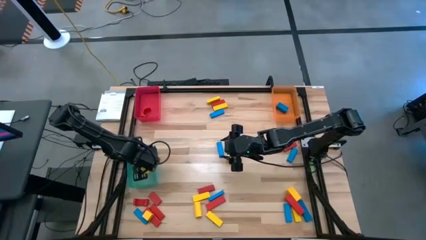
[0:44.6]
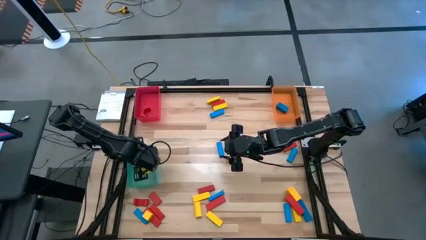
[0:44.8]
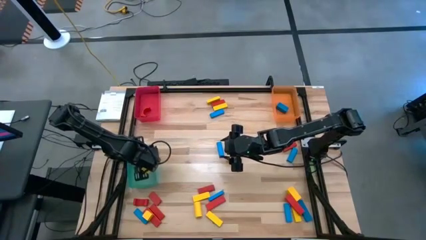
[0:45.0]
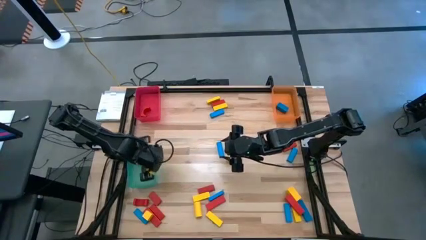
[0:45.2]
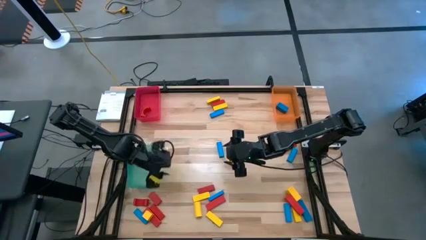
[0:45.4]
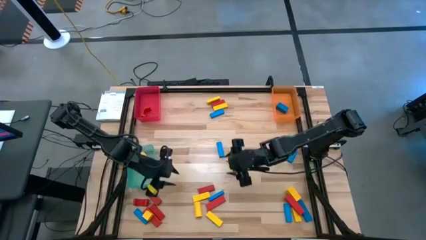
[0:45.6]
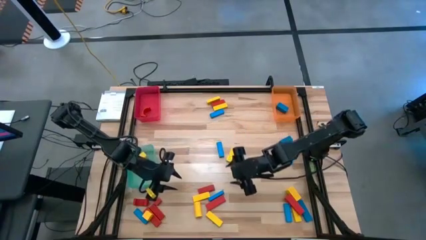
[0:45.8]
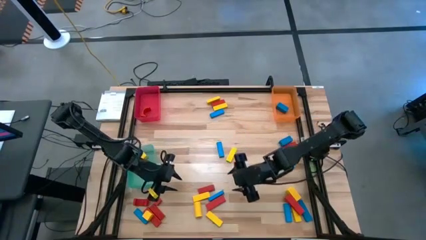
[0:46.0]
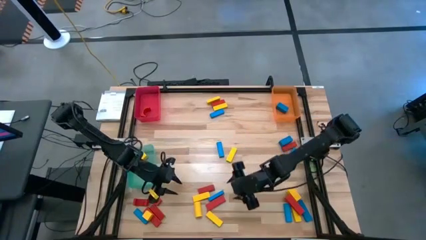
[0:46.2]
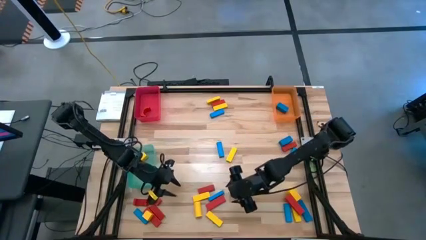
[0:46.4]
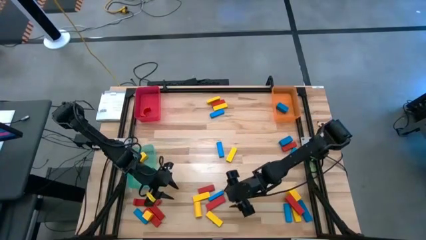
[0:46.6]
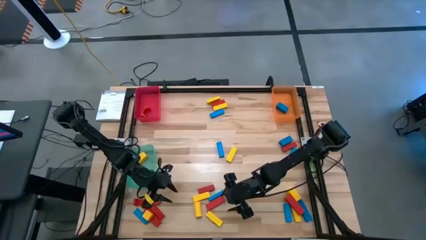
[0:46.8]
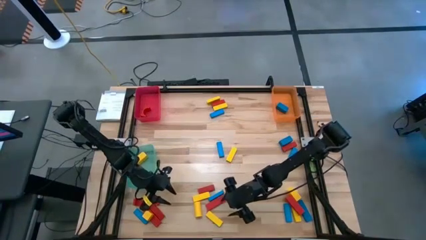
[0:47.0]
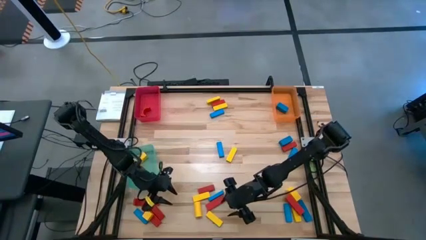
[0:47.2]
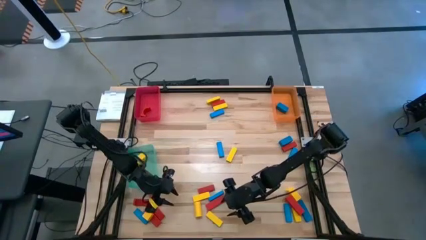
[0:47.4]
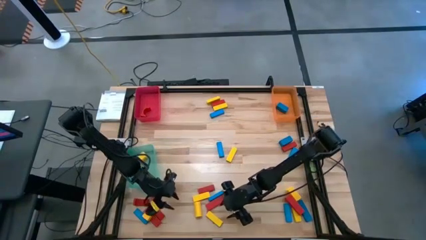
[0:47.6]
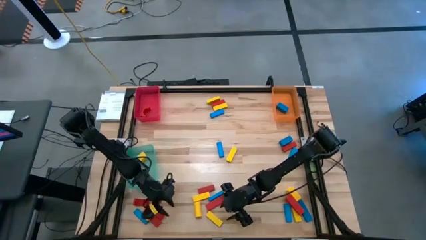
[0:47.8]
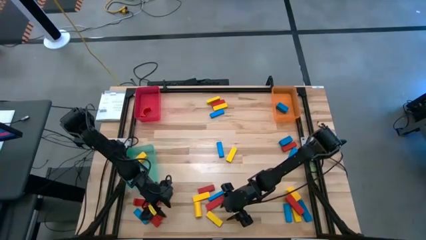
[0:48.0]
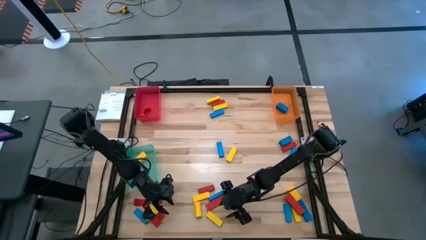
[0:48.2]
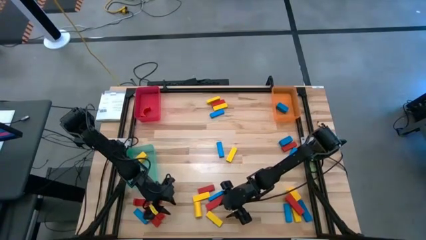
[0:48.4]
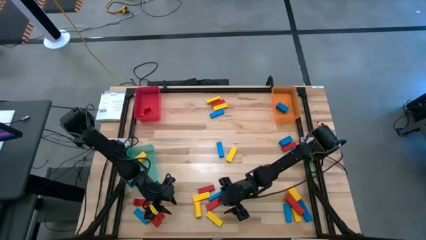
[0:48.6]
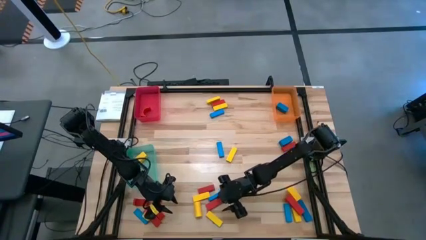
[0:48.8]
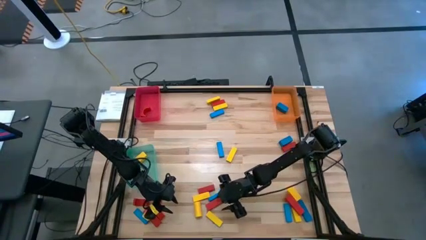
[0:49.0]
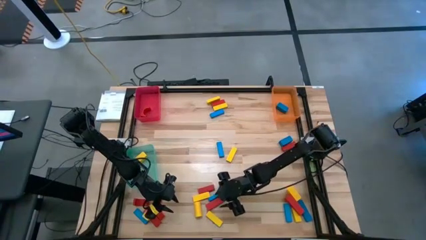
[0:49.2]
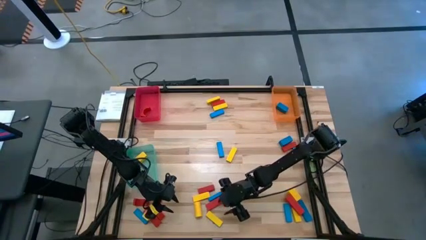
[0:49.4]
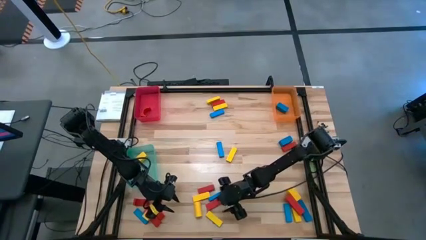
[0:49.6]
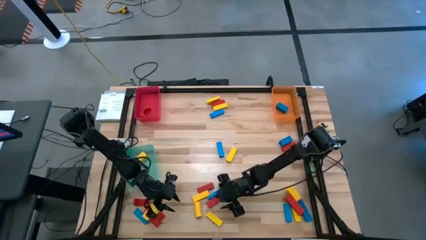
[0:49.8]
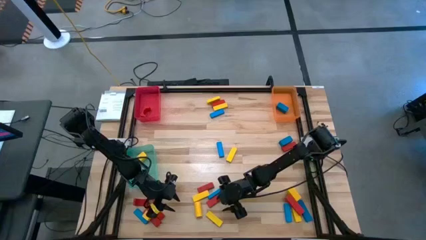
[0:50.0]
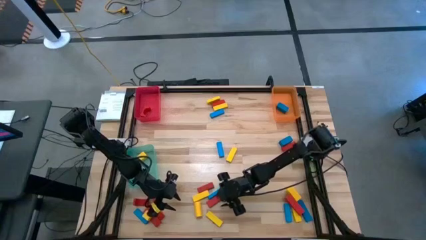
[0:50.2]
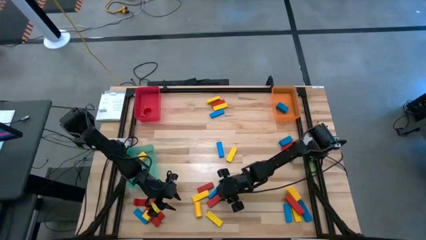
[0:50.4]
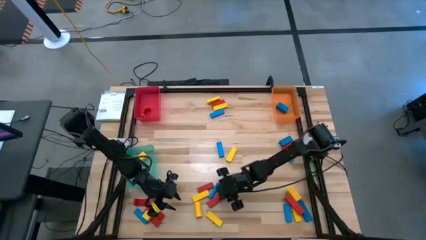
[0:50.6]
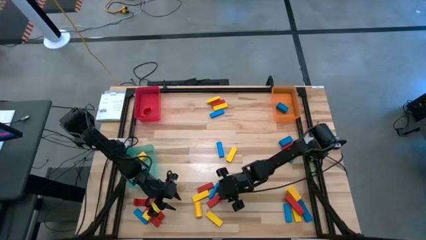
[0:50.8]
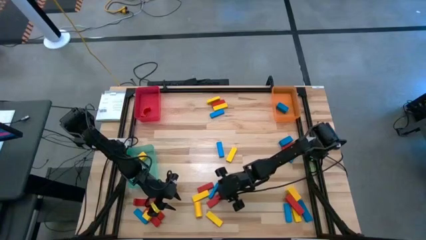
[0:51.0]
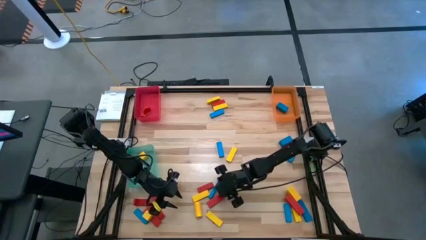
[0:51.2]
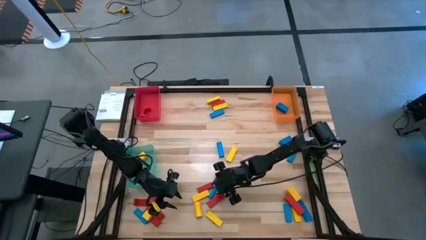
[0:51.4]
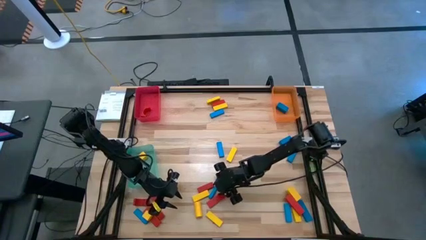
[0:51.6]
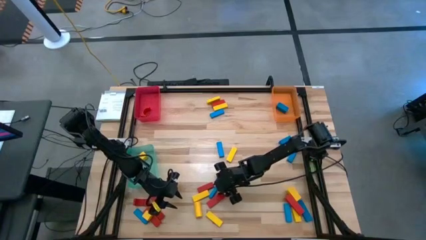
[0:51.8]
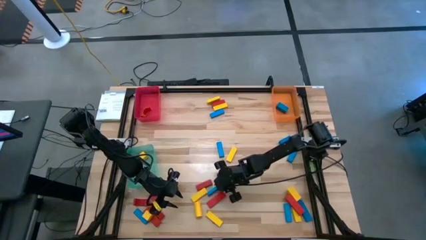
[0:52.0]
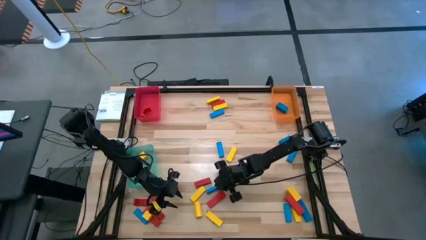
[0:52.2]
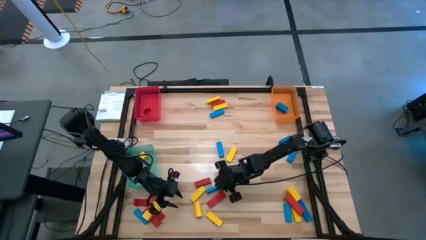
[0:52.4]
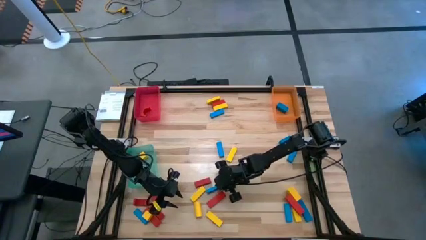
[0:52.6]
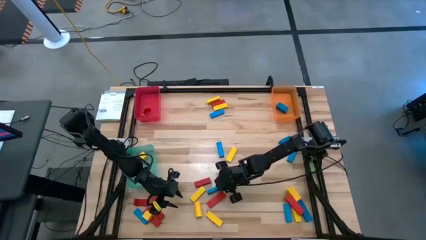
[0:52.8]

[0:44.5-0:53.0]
Task: Sort blocks
Put the blue block into the orange bin

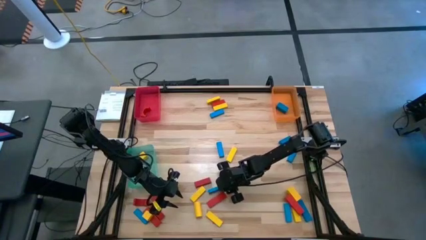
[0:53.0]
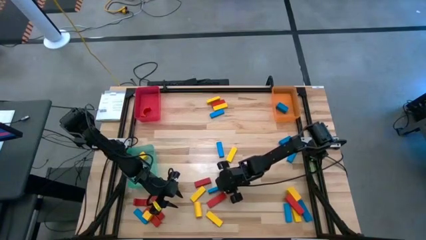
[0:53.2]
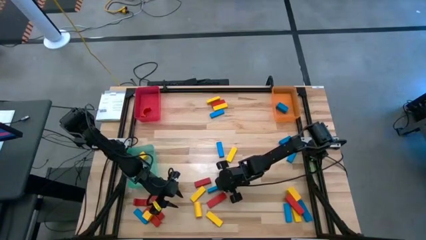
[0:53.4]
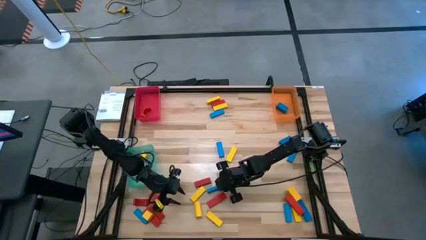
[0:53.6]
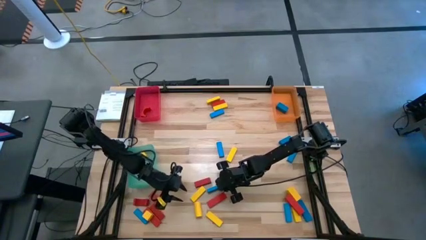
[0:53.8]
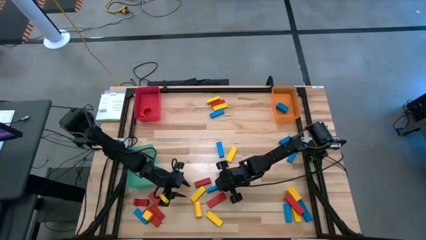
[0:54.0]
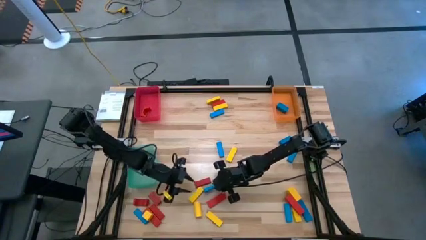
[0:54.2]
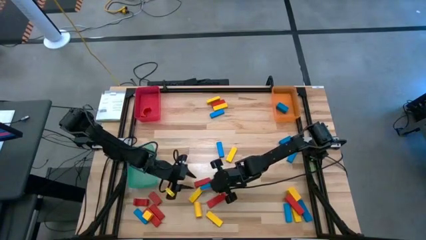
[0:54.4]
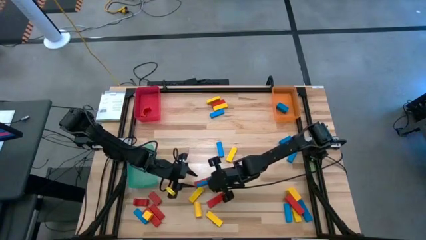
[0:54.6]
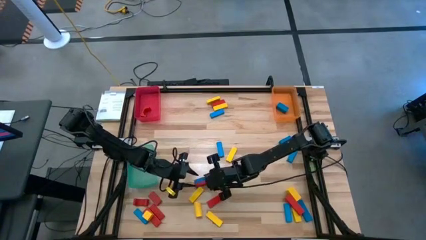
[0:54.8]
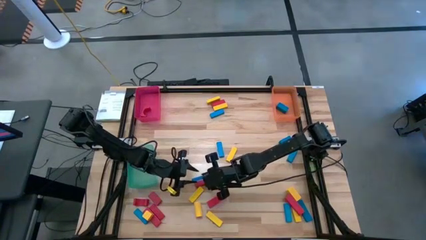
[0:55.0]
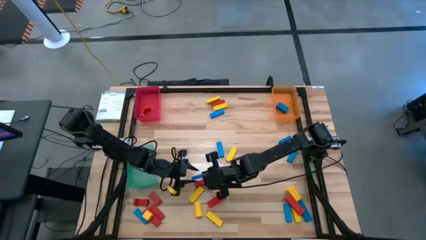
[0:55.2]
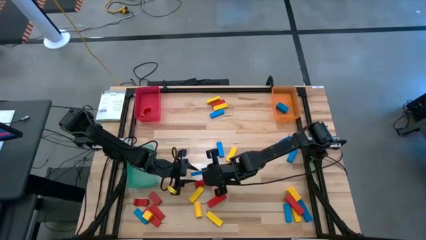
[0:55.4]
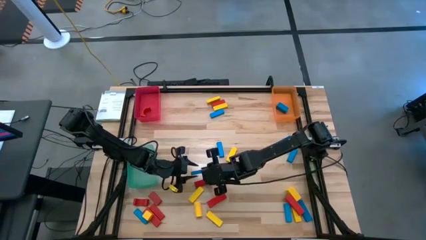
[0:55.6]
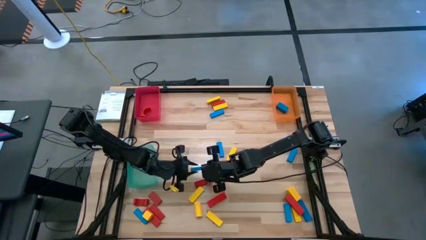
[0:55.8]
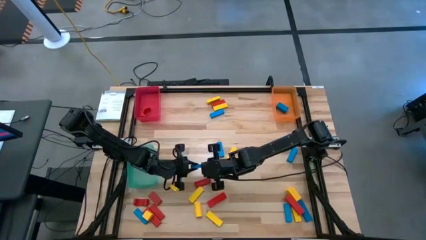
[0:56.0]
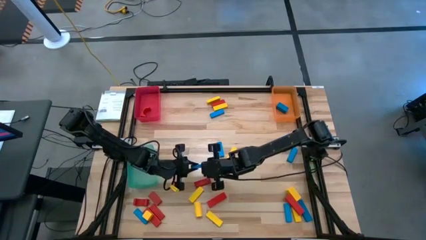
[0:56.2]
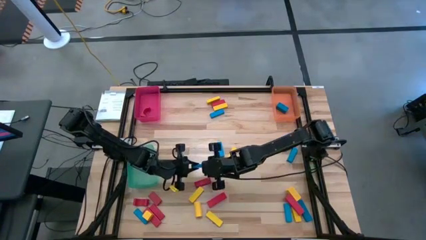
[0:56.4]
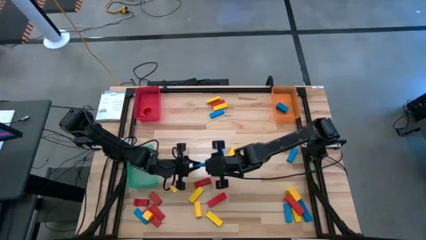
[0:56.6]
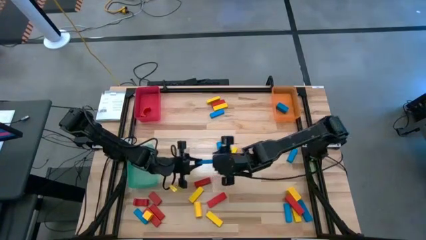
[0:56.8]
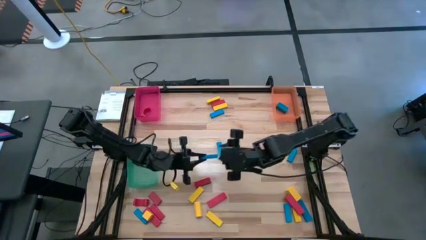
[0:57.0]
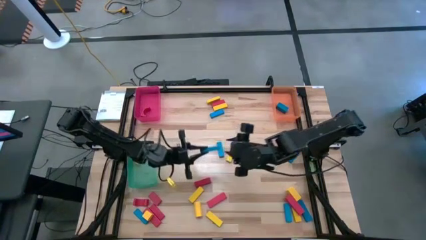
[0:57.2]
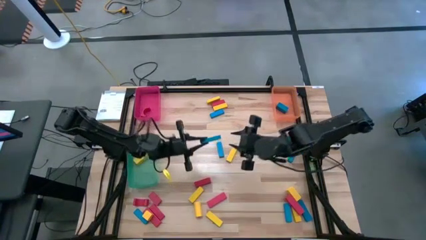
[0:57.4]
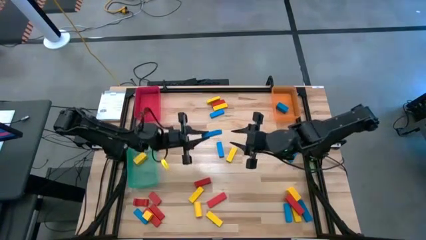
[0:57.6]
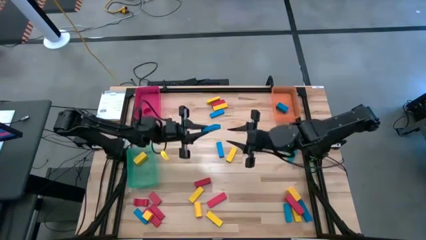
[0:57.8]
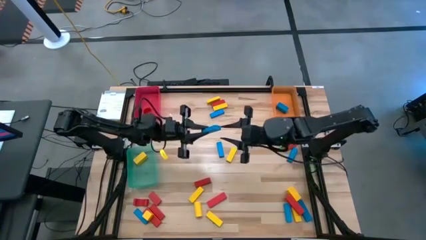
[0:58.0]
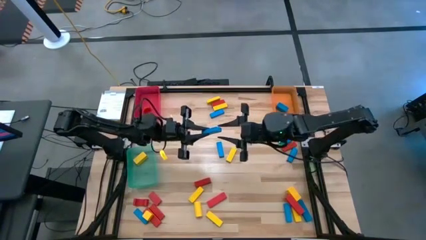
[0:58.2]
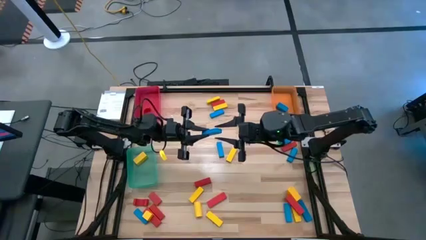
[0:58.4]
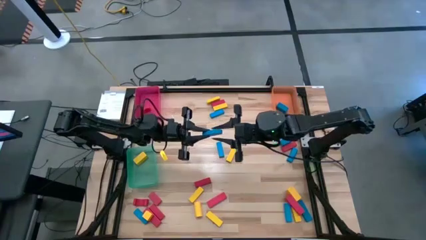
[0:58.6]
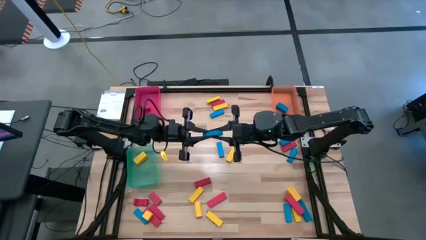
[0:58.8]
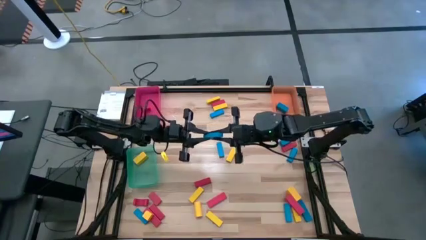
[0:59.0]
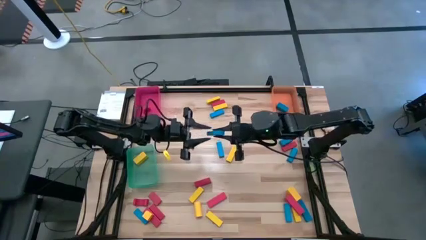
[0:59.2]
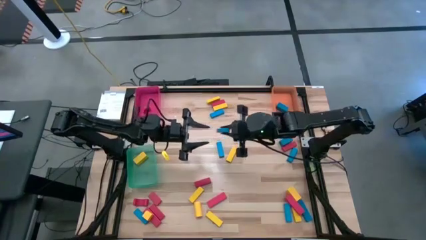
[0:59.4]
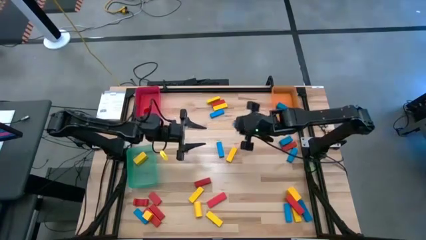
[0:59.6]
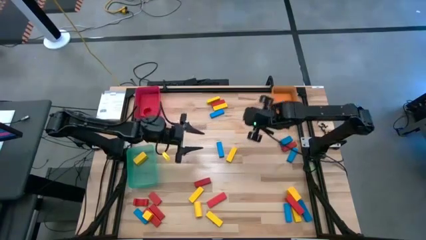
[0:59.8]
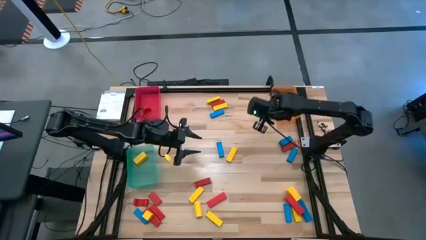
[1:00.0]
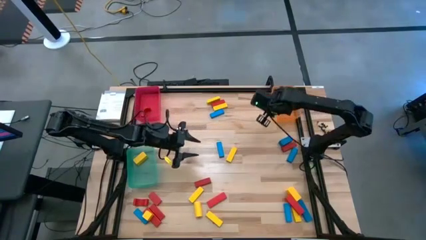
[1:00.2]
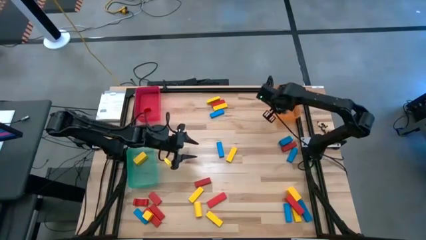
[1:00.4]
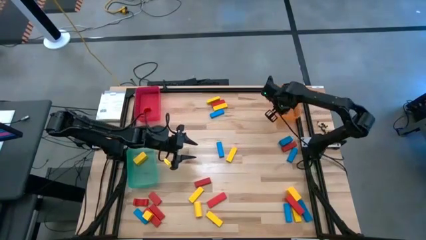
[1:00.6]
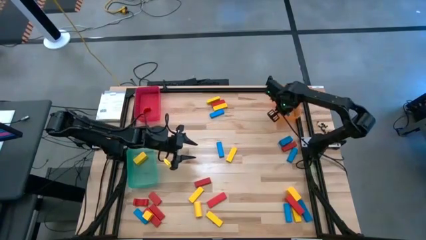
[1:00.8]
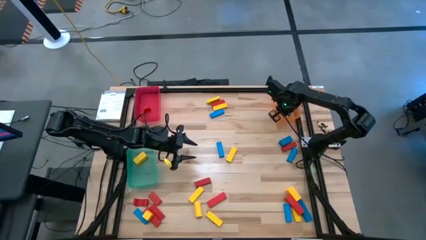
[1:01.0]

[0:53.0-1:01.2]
Put the blue block into the orange bin
